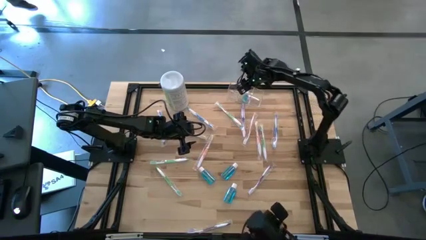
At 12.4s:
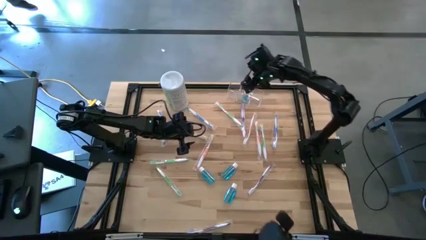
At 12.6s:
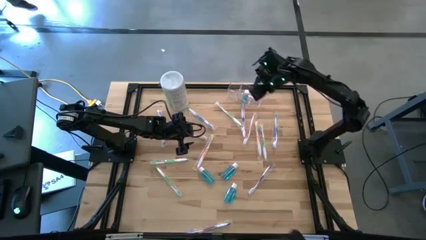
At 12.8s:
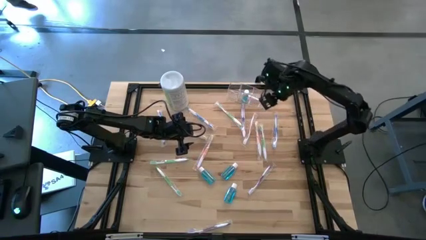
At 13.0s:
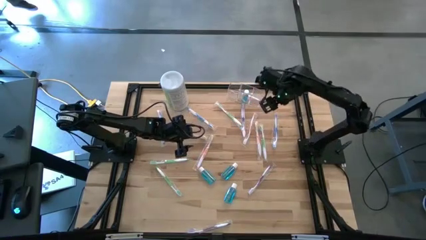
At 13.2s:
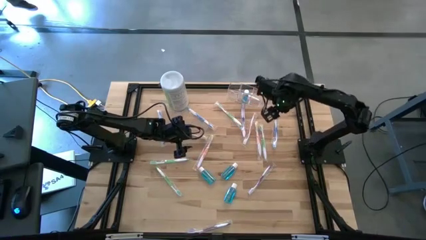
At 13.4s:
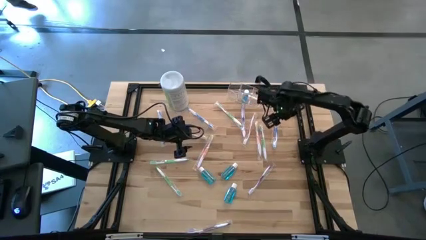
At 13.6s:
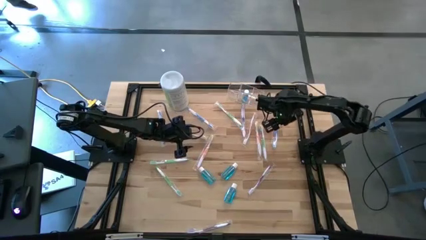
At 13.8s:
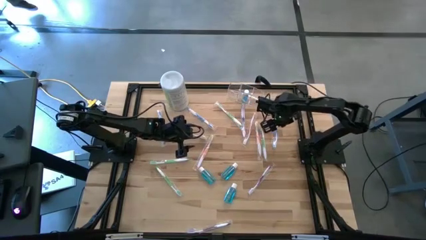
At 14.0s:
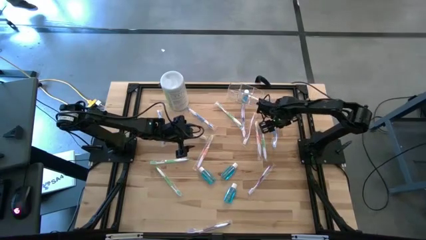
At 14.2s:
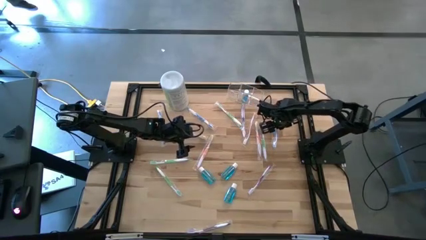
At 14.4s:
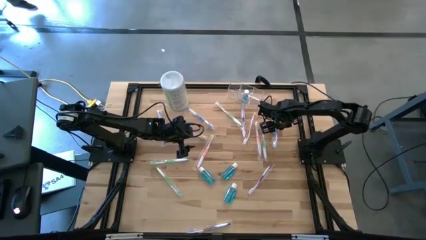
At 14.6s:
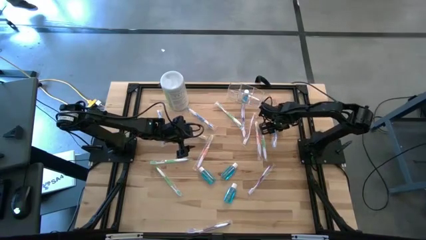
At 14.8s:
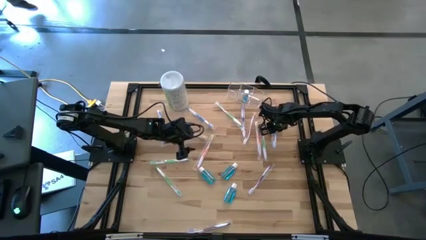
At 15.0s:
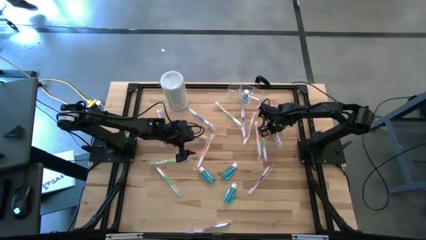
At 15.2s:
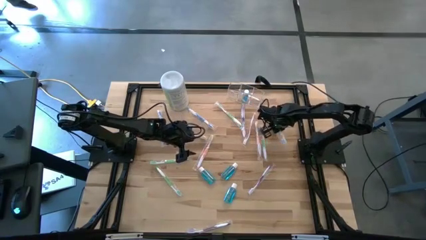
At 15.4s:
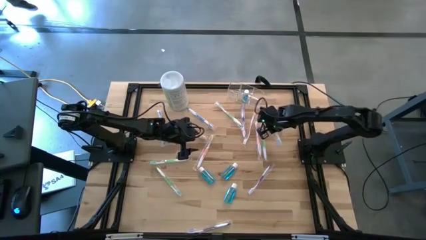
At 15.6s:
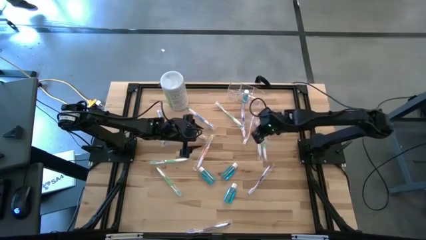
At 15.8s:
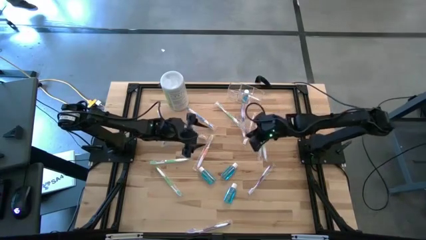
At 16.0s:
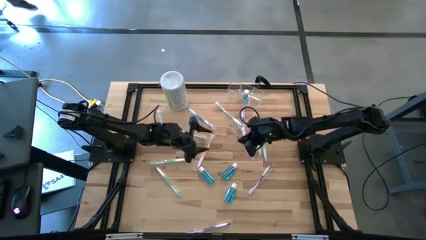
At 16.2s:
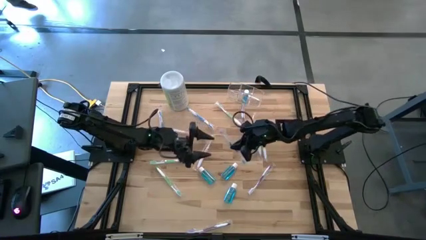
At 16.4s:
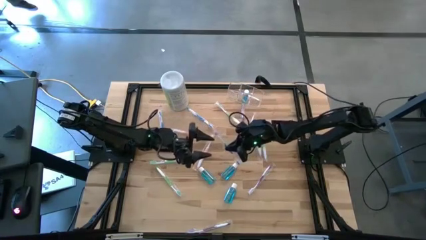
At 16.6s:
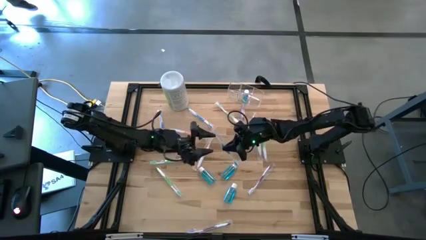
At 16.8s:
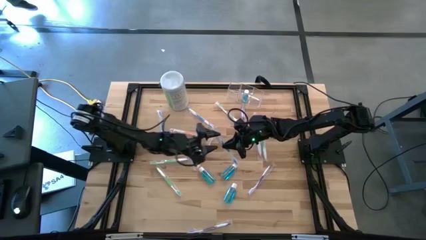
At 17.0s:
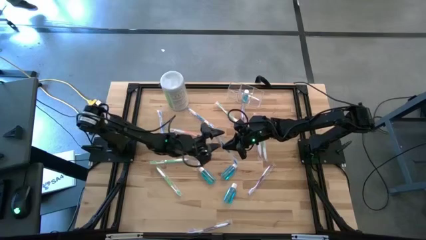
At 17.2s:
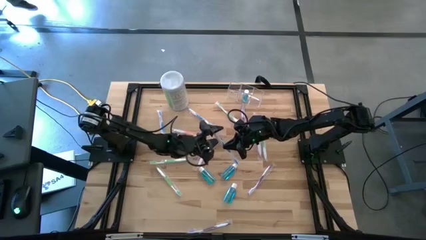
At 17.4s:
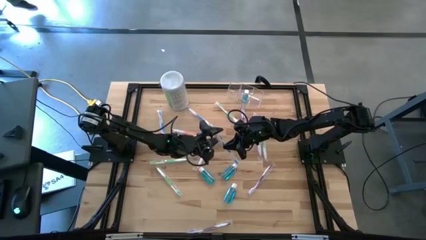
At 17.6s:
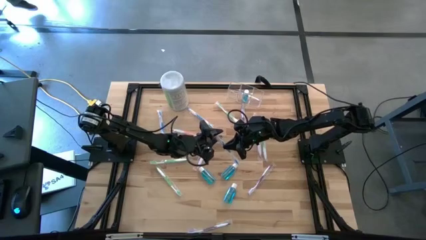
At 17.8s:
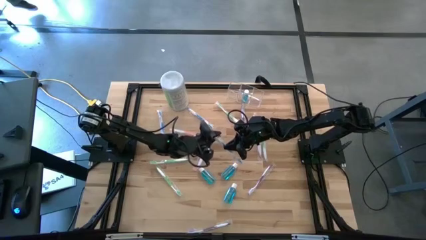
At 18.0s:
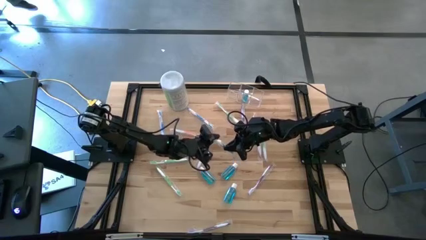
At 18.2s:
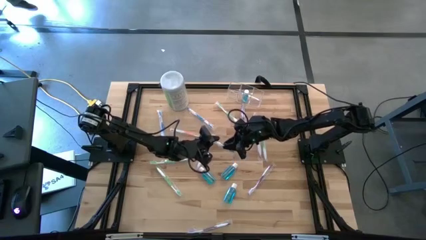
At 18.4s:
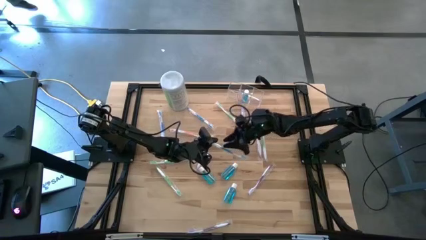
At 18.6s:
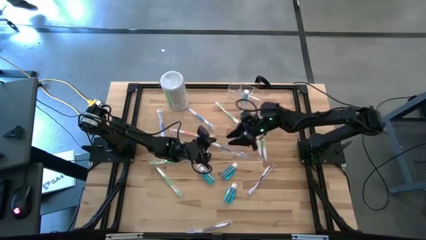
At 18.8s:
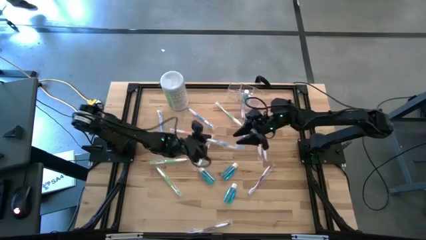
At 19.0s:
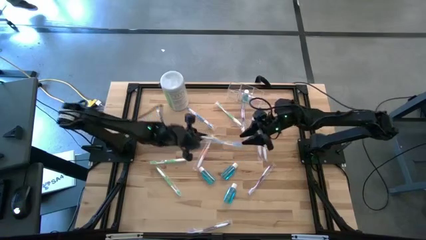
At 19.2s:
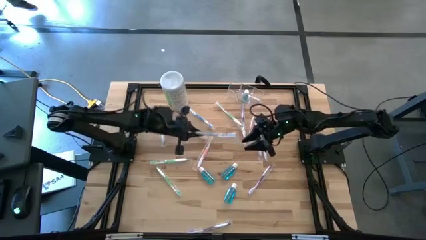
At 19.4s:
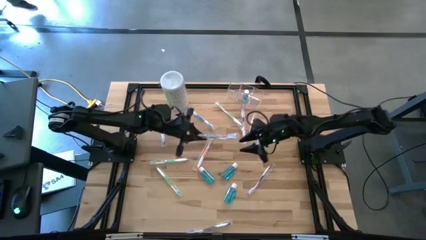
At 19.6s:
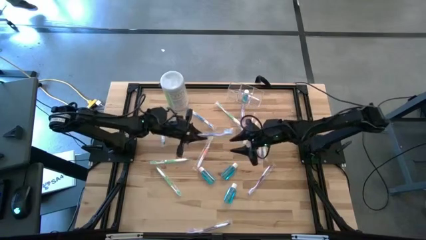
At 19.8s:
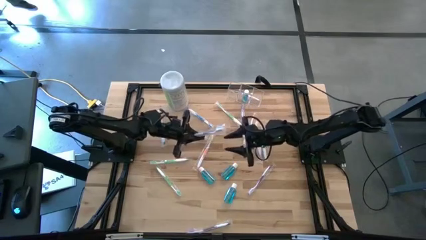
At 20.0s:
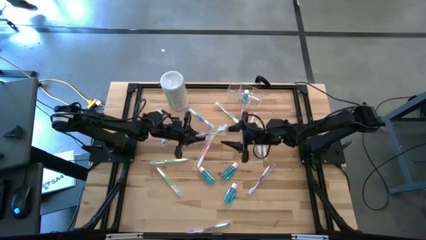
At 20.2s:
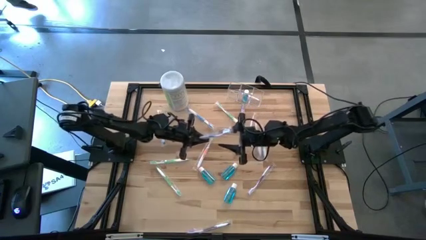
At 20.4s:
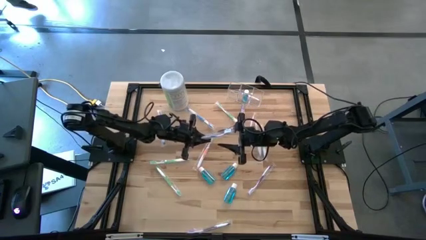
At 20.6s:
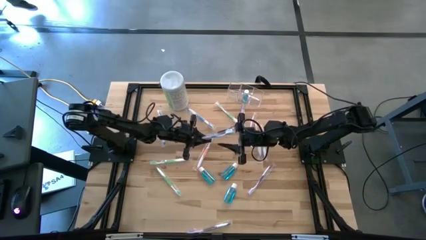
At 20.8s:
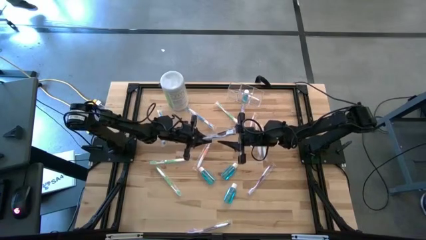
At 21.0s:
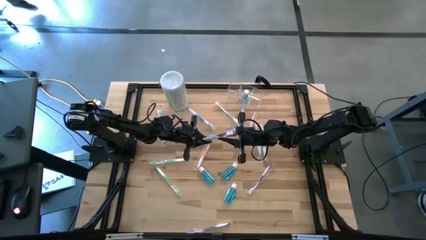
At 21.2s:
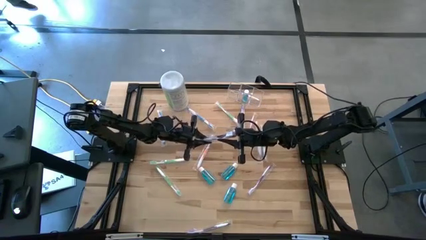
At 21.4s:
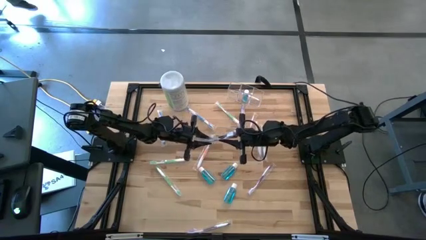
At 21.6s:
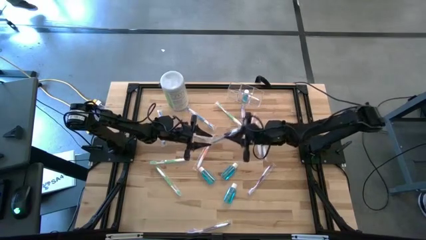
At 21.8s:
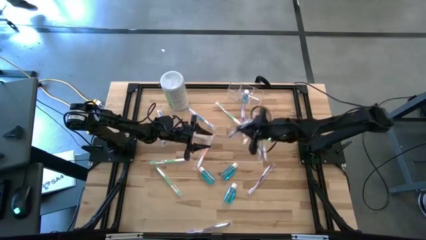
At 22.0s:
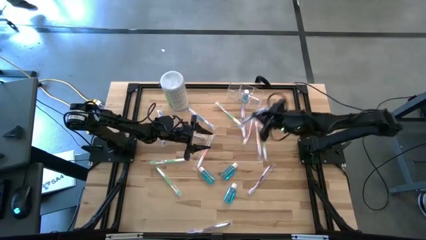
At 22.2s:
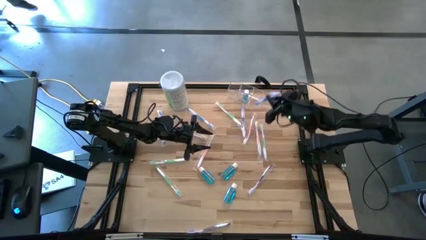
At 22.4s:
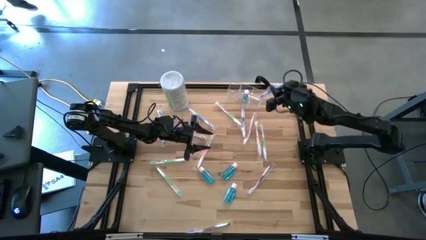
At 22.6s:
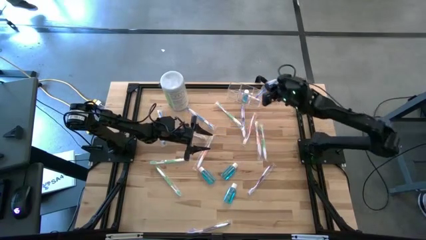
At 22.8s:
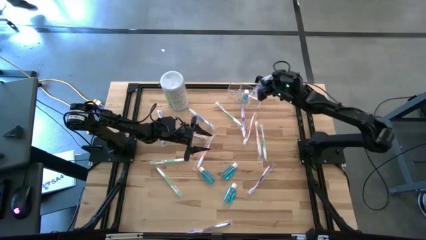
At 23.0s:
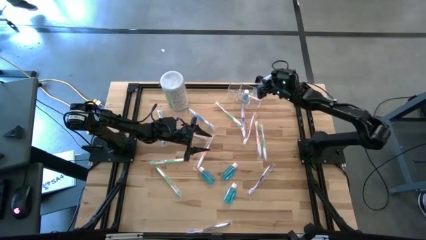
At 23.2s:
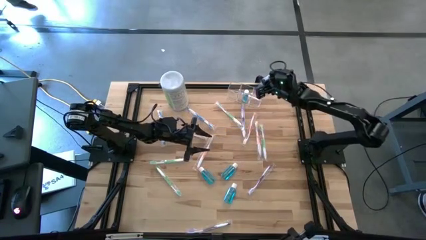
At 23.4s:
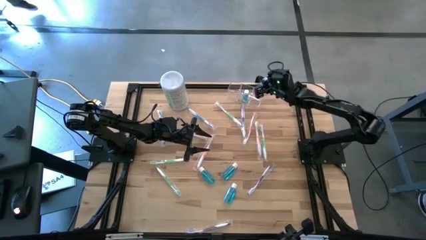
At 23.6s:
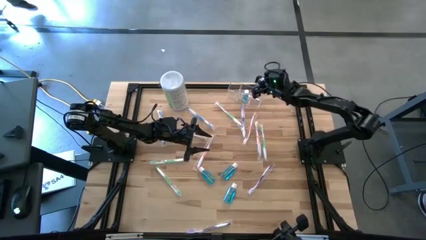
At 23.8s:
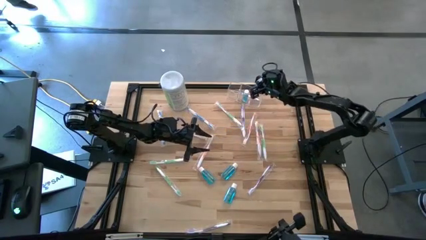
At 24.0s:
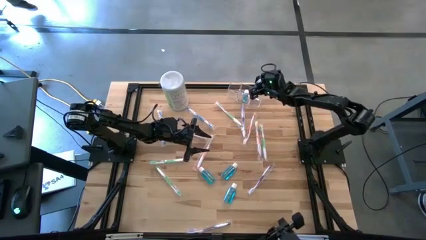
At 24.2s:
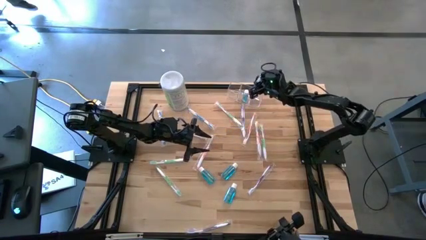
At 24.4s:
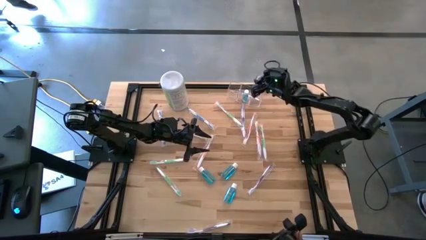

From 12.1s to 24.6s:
Task: Pick & Place toothbrushing station
Put the blue toothbrush into the transparent organizer

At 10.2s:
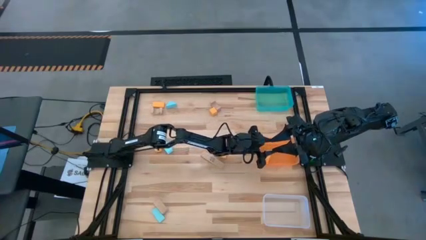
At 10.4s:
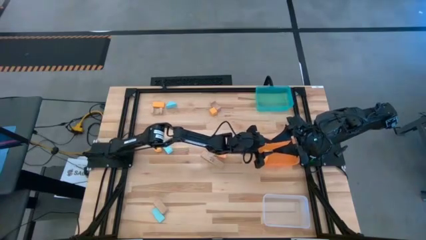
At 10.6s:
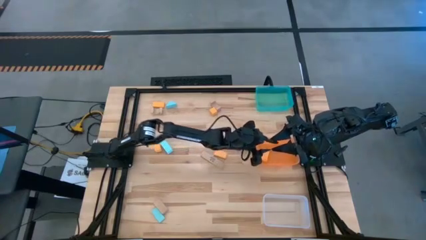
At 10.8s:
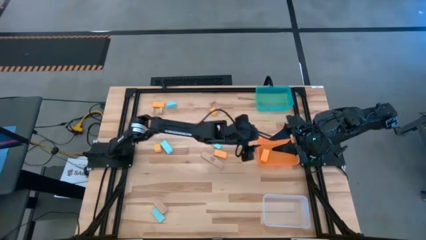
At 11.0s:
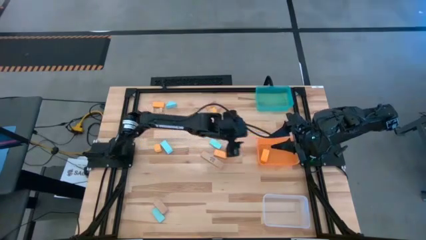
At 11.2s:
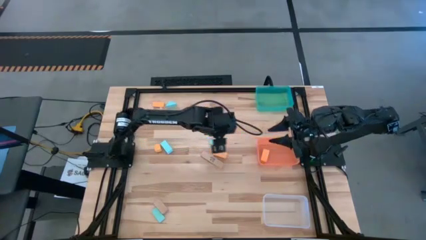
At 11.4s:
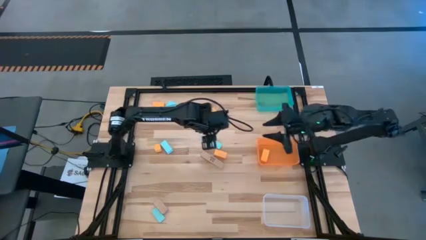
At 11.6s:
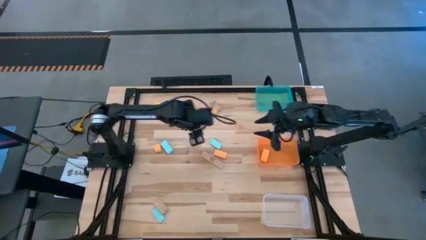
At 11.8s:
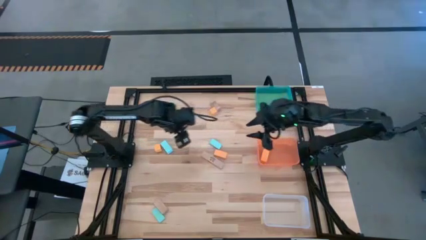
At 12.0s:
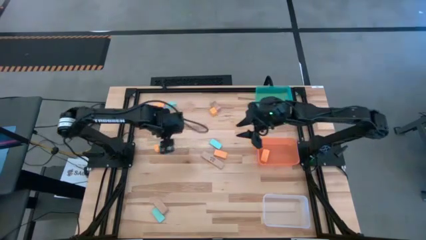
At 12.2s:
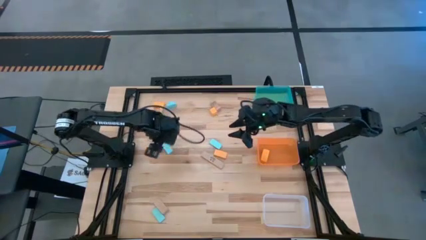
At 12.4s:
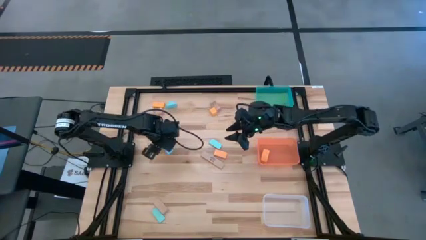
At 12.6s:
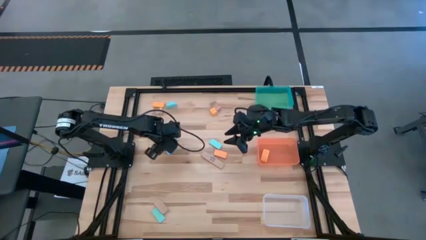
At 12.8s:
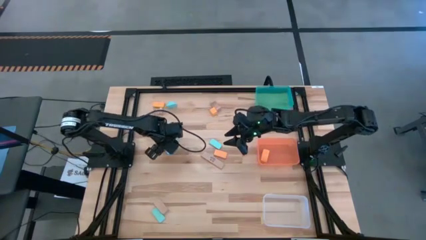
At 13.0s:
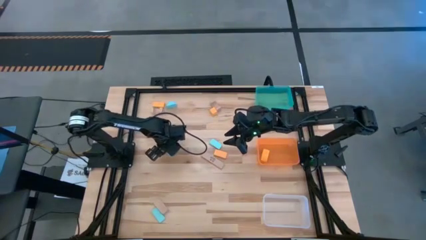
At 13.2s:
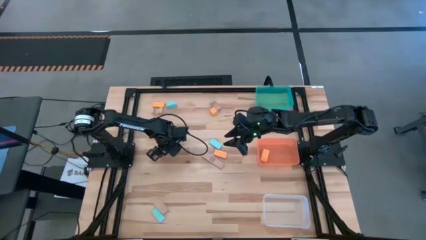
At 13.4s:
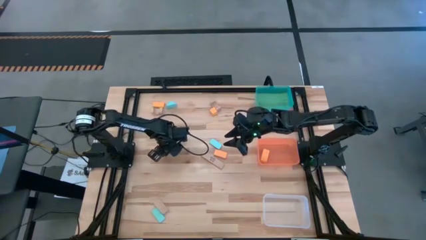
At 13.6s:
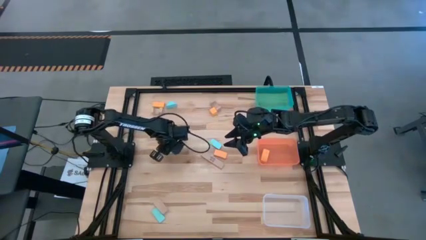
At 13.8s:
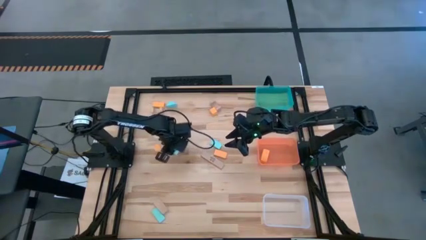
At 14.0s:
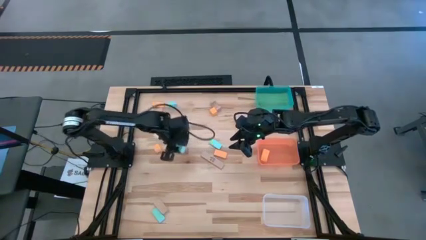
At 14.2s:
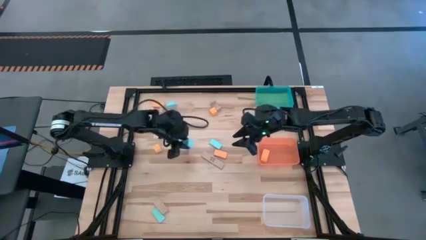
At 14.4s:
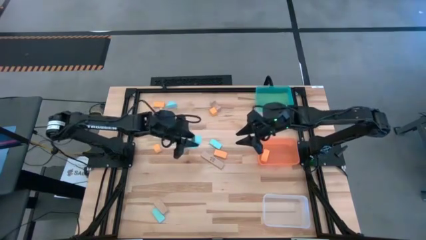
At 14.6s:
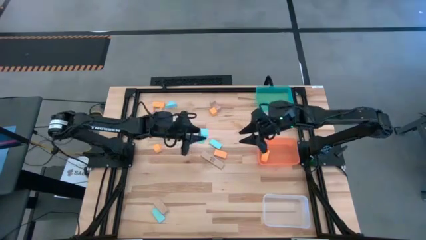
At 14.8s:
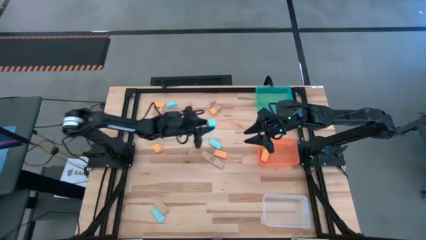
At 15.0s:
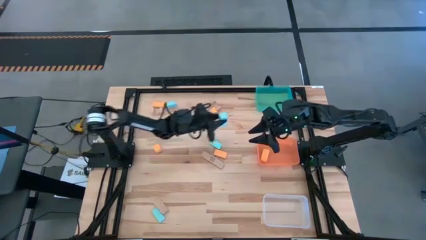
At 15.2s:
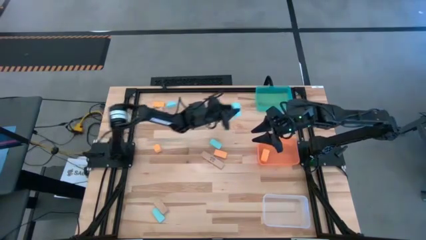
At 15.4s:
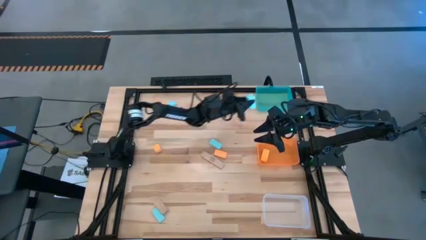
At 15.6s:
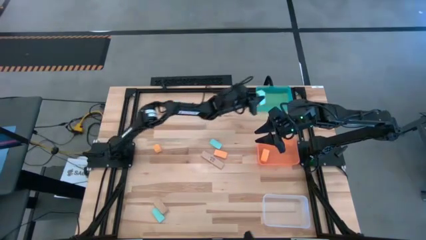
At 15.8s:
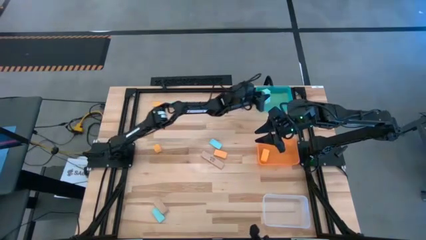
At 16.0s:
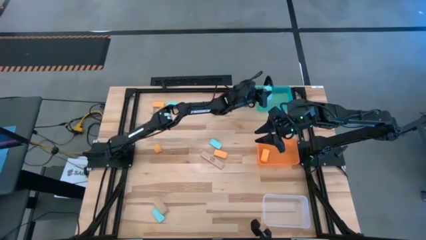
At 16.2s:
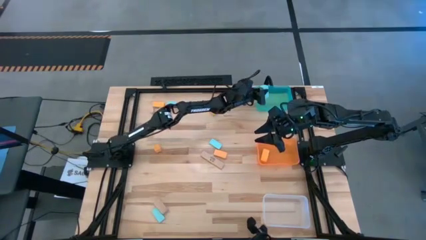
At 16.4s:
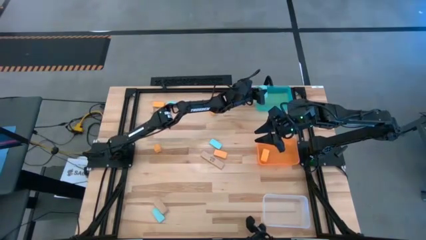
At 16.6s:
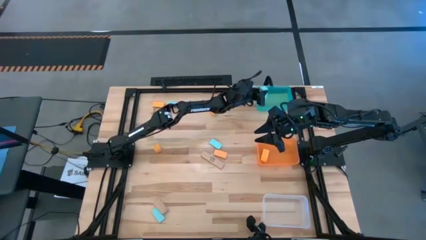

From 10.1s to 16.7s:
Task: Sort & place blocks by color
Put the blue block into the blue bin
